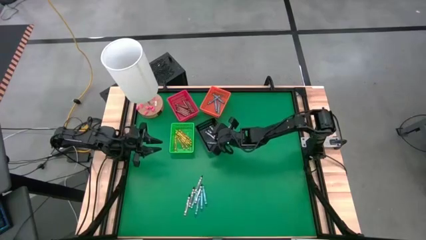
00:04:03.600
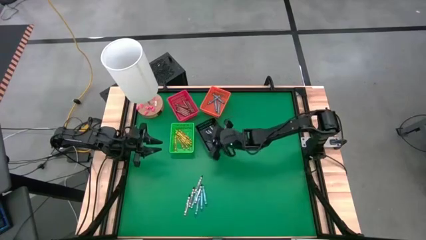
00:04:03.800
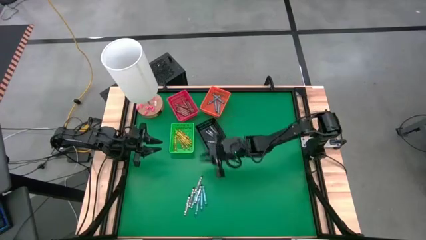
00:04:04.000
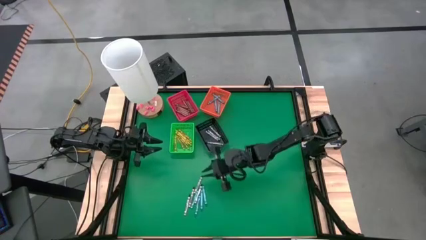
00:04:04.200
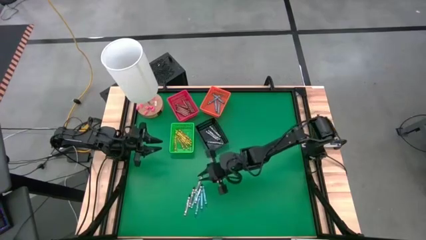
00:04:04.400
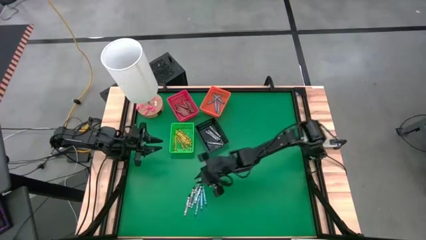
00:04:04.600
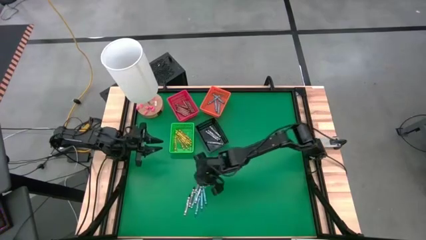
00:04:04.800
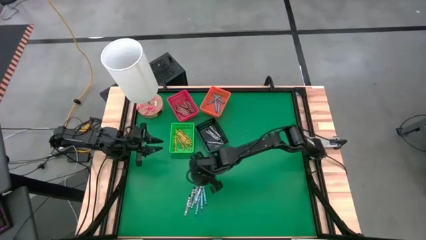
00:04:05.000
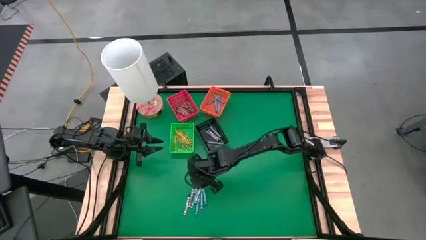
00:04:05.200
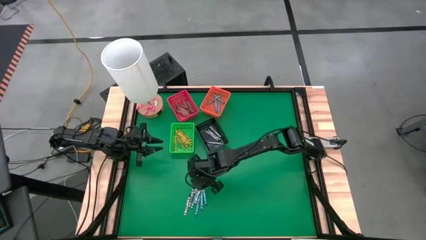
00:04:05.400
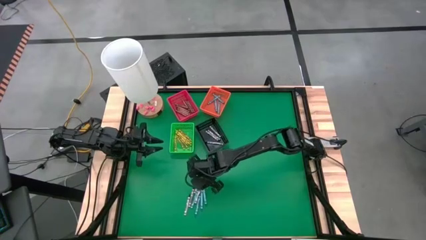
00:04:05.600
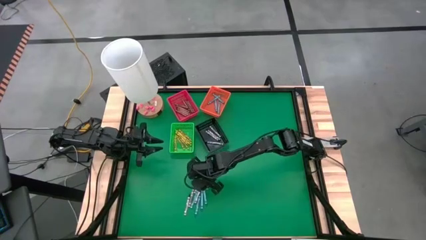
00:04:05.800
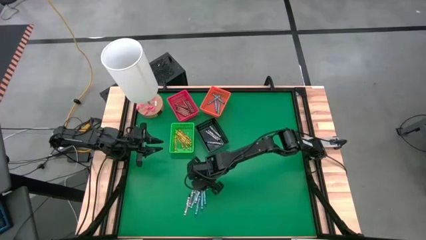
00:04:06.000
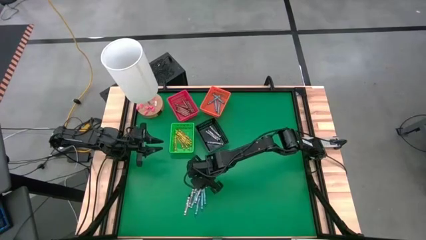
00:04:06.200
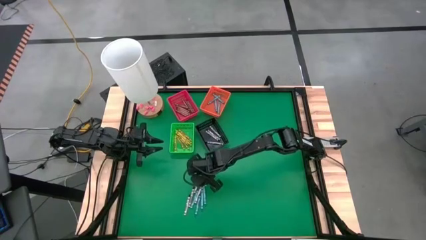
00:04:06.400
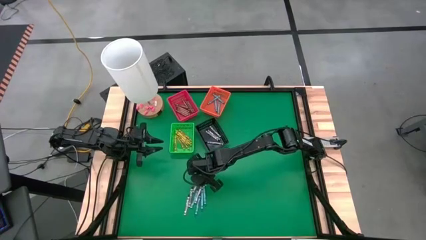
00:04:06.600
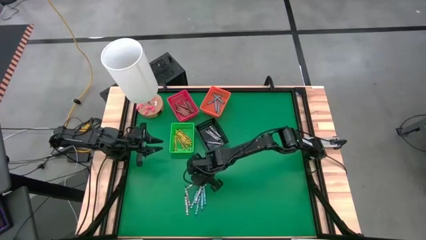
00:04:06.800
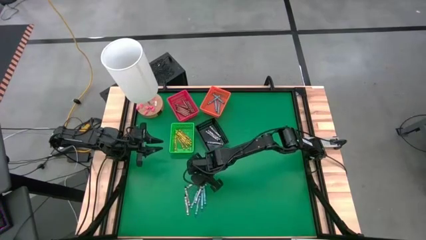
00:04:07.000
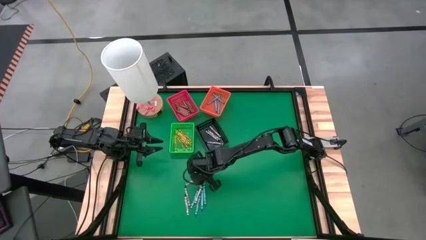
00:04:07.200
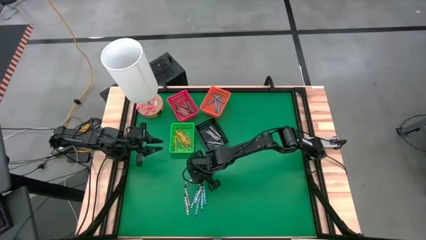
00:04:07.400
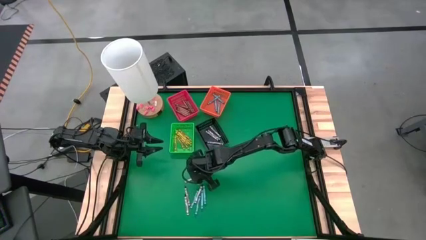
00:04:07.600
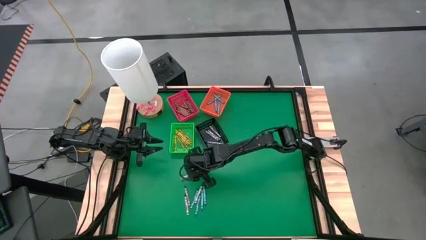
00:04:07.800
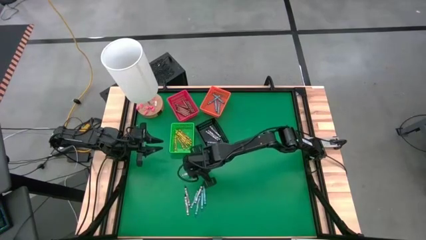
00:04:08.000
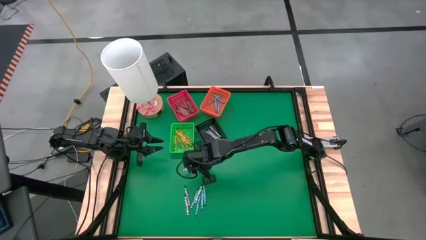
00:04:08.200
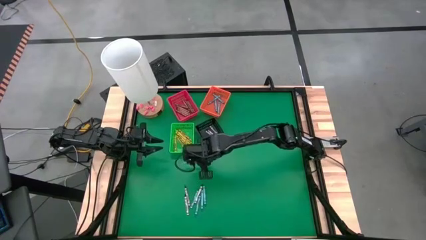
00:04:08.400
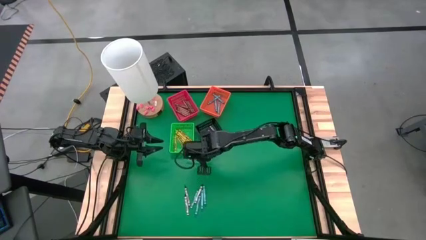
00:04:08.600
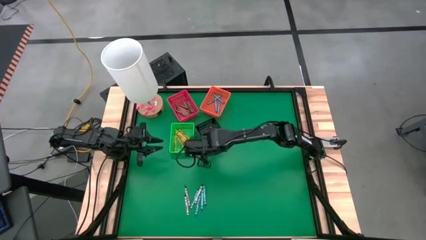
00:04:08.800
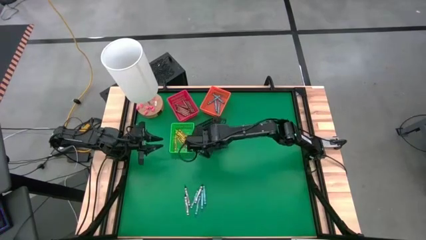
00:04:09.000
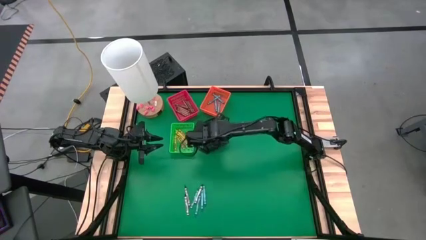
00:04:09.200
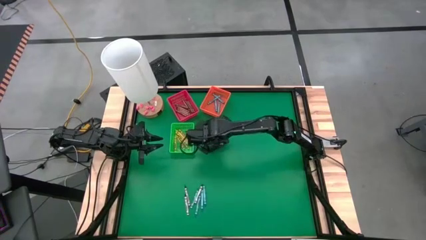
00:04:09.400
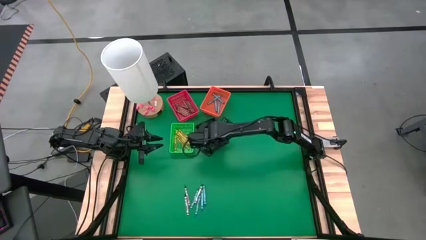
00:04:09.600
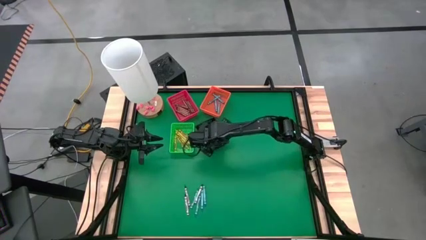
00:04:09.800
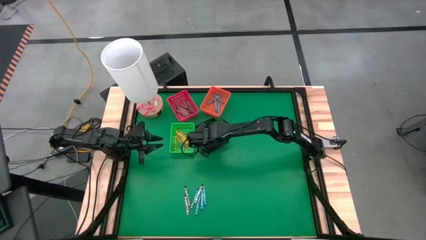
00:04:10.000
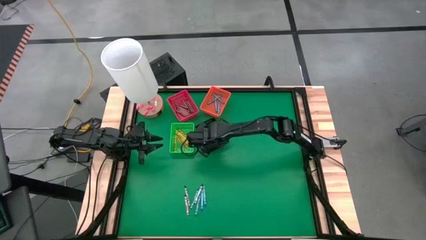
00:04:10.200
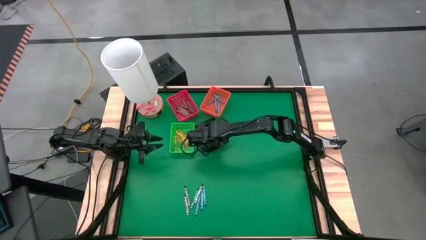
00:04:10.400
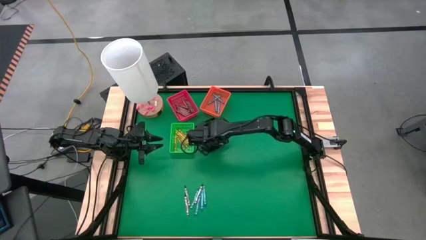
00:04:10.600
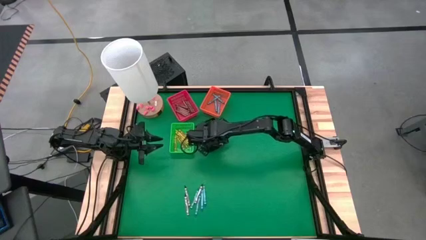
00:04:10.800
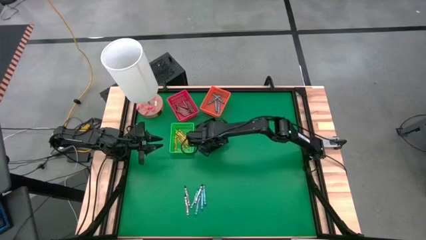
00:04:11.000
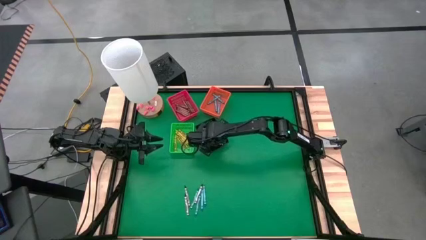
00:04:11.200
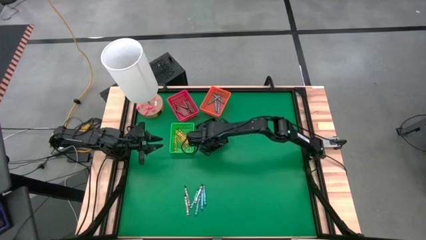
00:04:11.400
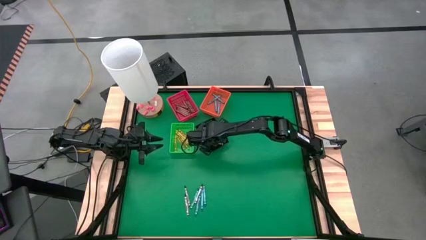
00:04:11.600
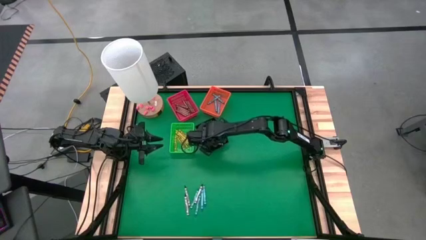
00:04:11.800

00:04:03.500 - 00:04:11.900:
Task: Sort crayons
Put the black crayon into the black bin

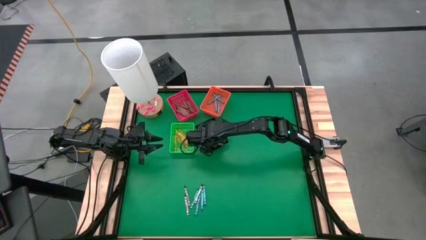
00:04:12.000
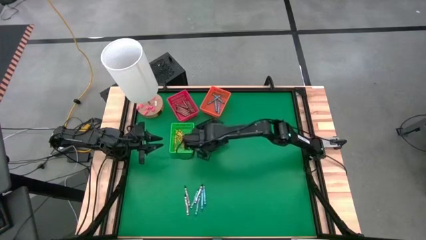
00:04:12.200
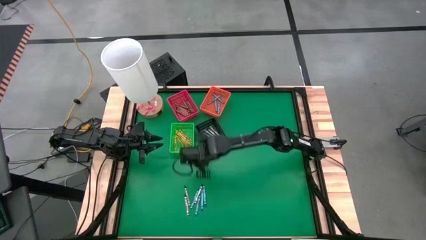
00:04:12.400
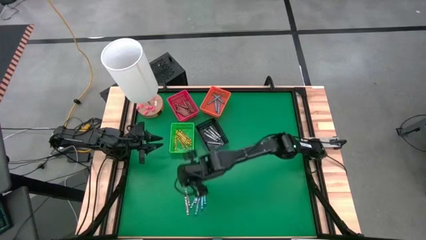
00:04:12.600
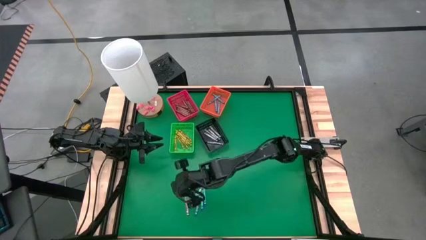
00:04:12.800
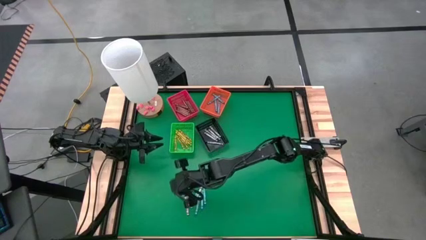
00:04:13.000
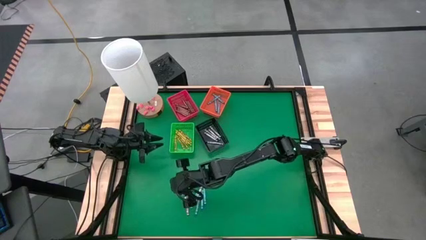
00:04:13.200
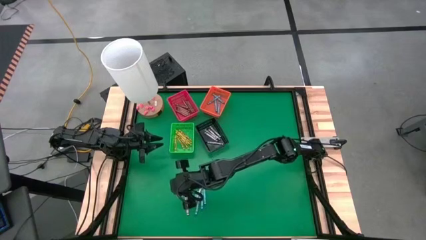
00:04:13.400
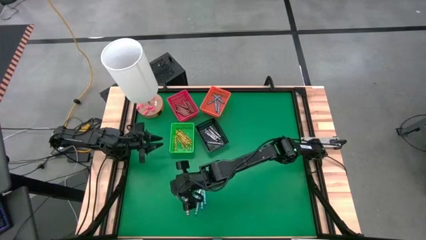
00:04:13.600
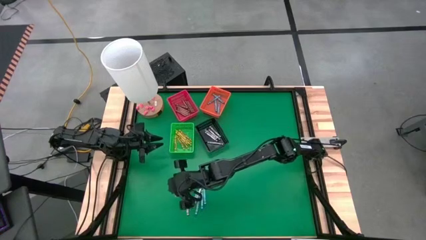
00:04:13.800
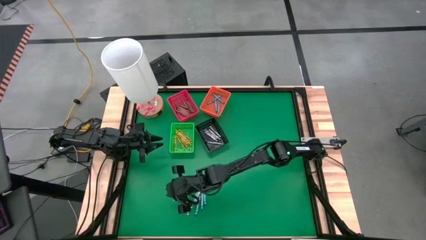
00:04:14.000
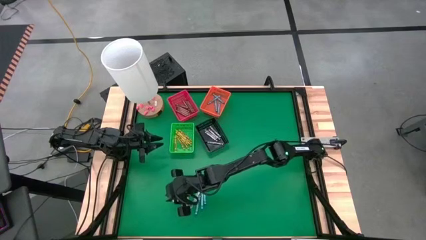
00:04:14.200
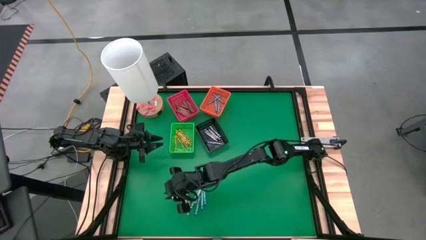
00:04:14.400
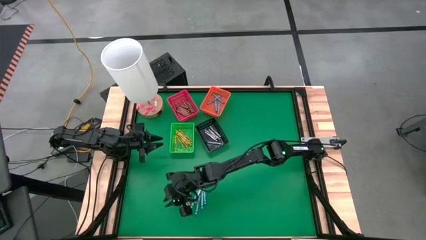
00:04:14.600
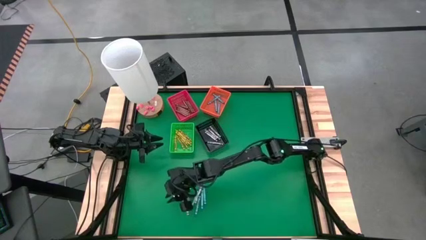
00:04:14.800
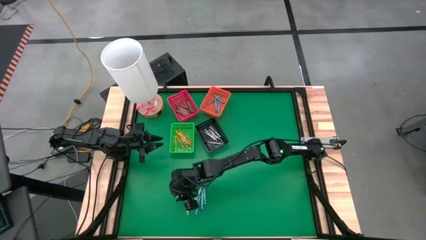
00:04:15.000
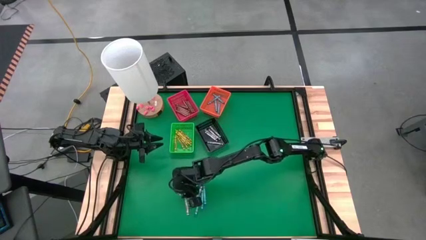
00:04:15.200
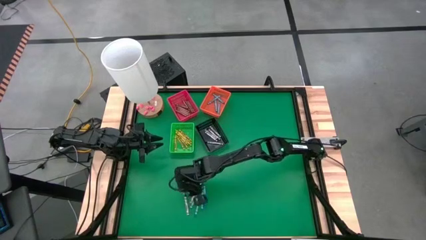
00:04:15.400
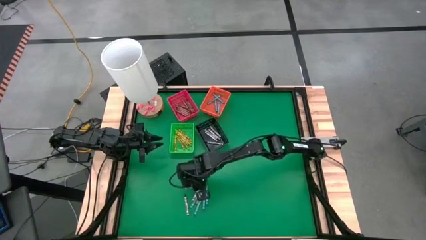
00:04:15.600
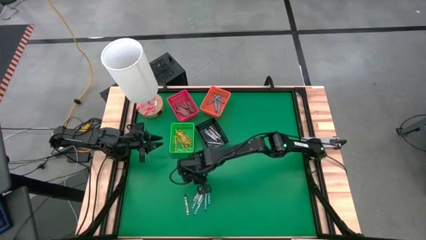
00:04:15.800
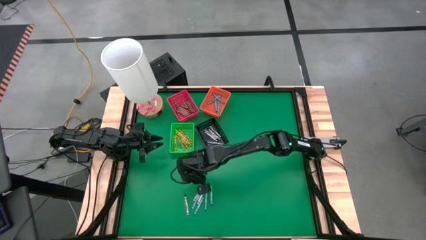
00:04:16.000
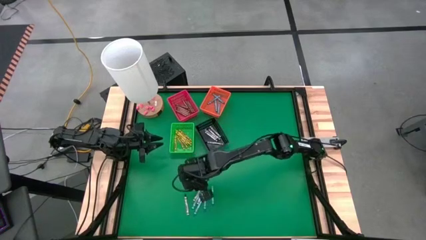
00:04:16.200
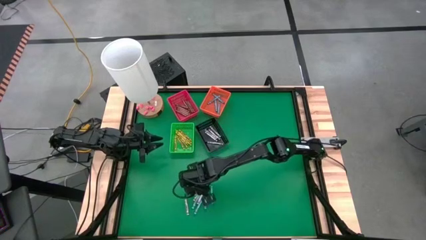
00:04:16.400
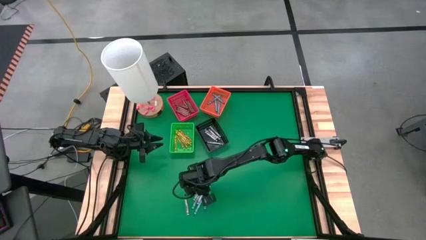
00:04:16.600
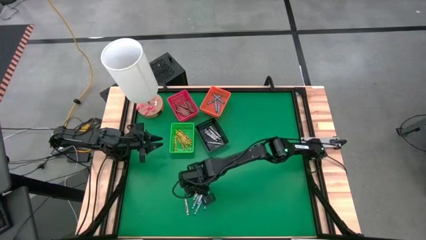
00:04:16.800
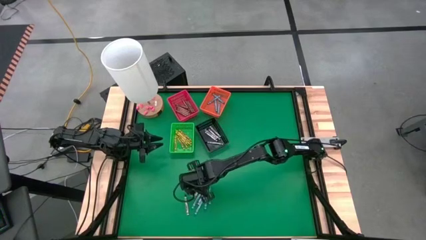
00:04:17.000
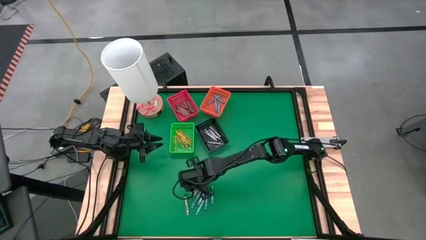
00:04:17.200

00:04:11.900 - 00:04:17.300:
Put the black crayon into the black bin
